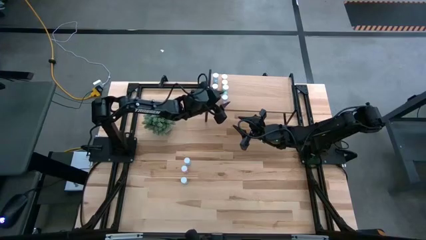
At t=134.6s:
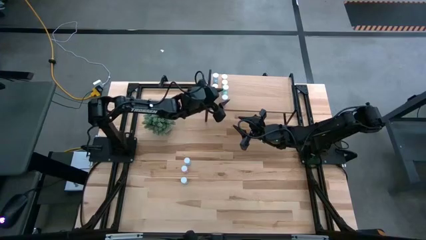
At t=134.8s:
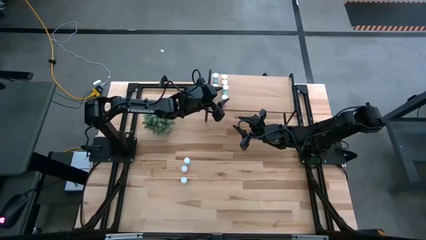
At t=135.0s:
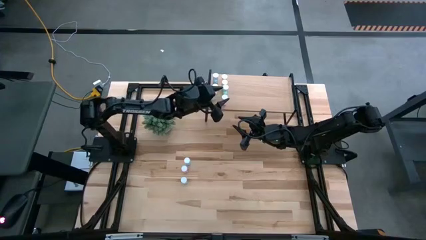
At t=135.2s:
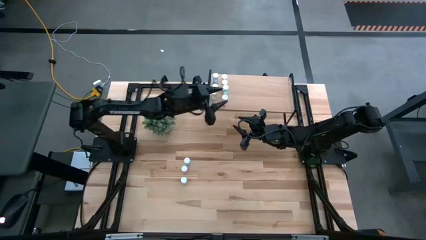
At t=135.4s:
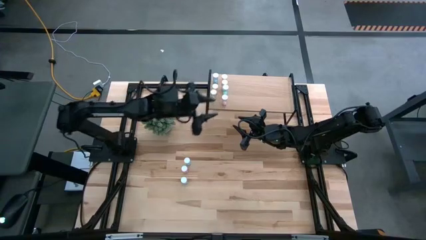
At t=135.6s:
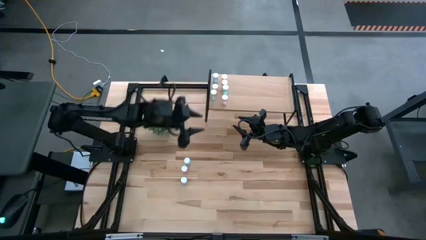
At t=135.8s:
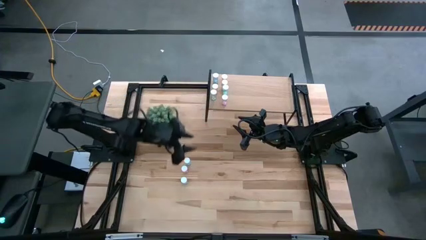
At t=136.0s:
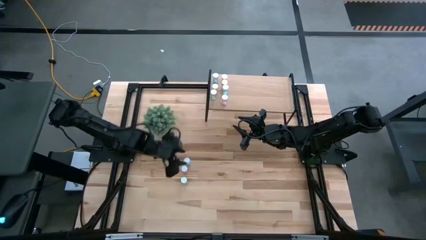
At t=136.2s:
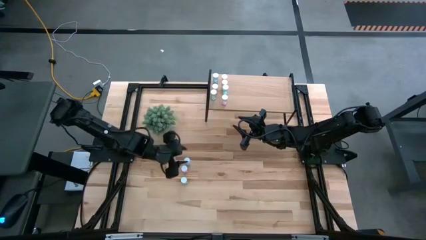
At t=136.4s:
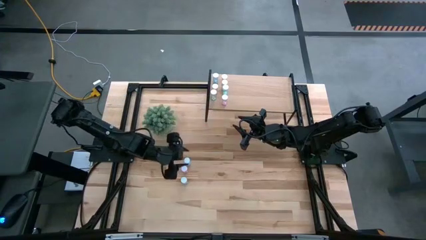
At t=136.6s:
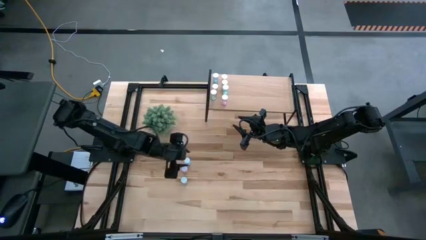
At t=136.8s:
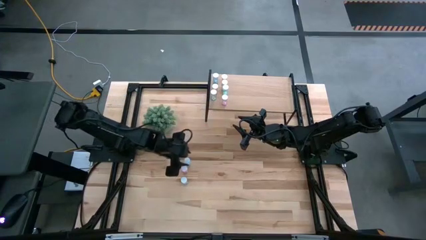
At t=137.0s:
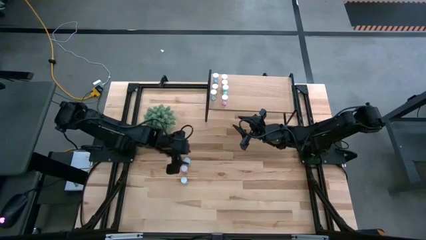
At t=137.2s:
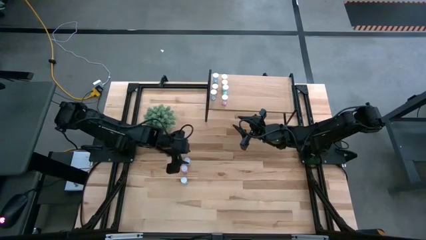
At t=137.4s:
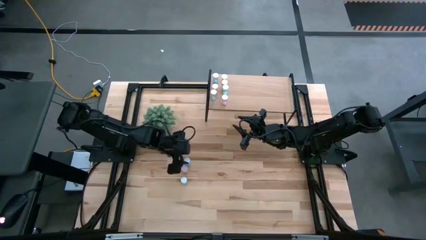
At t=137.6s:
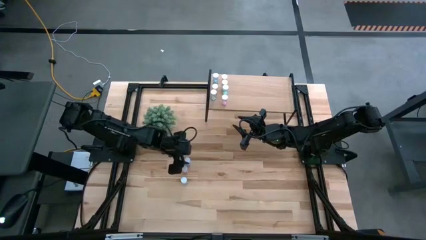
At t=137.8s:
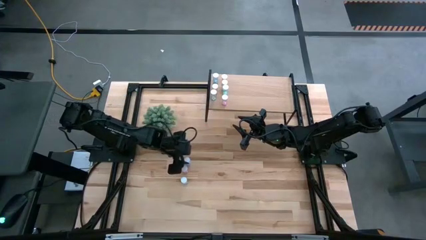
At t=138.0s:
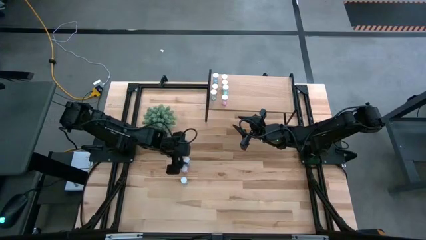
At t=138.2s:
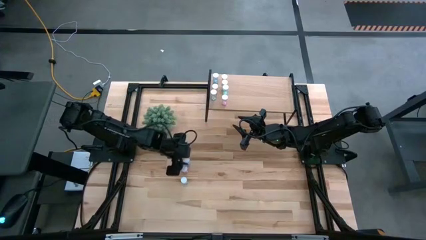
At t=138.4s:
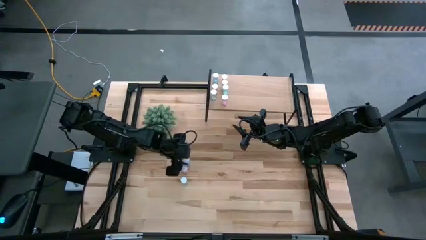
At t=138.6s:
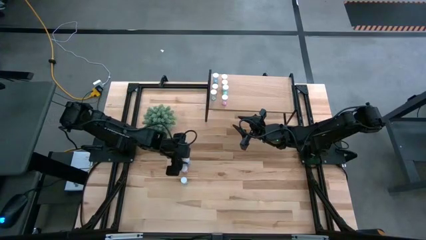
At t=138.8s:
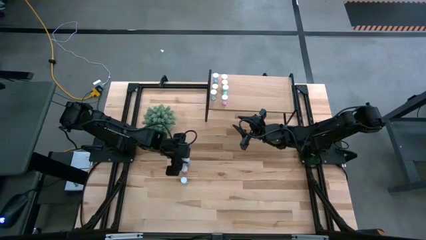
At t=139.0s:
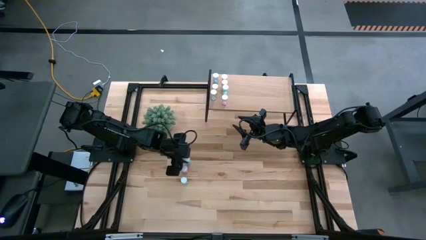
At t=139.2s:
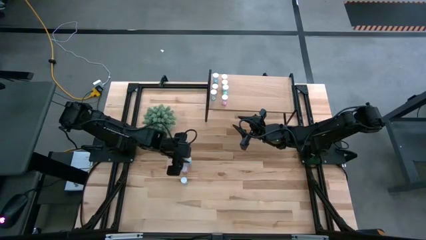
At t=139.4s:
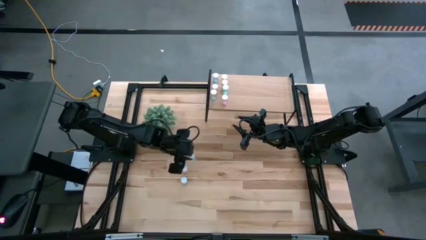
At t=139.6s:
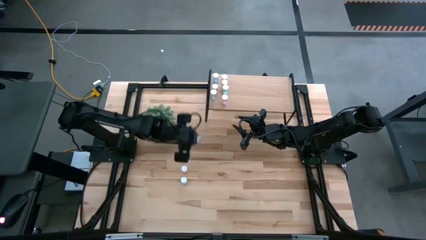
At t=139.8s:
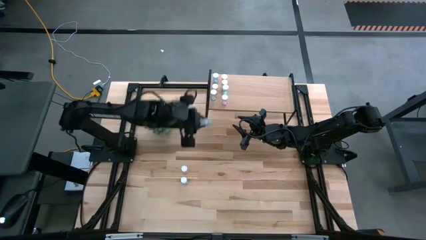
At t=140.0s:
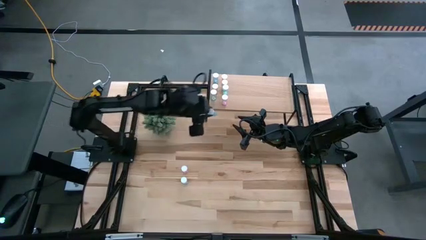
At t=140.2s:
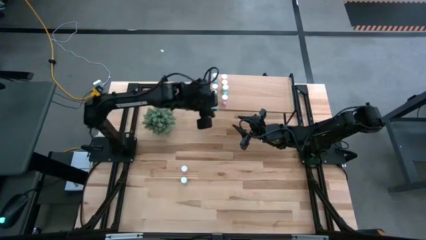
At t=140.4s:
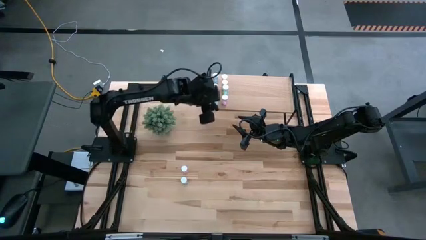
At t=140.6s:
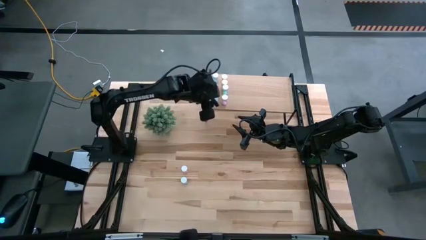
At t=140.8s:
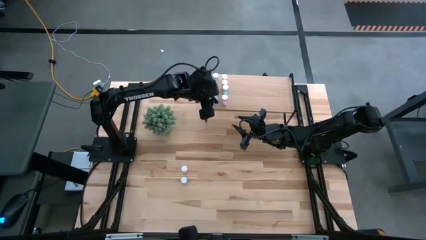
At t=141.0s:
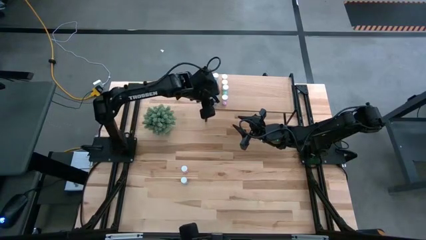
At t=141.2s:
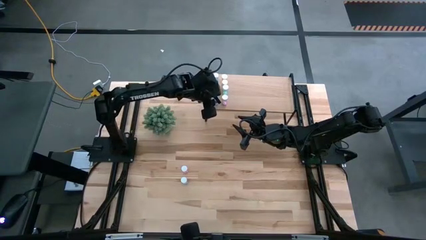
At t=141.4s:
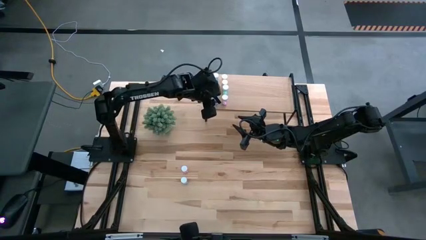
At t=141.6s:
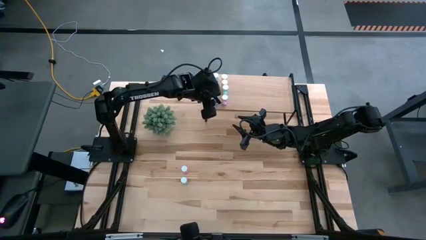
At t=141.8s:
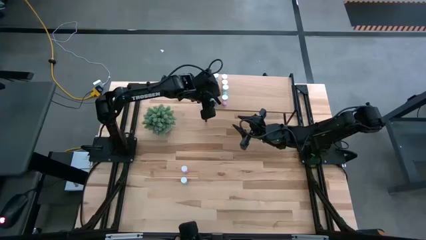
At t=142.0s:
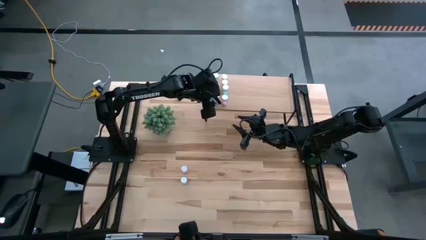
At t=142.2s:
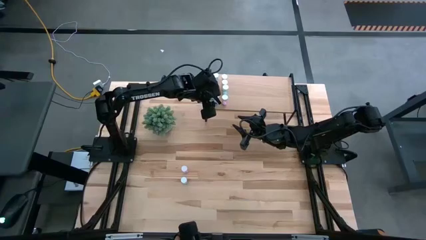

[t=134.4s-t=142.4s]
Task: Pick and place medicine bottles onto shelf by color
Put the transparent blue medicine bottle on the shelf

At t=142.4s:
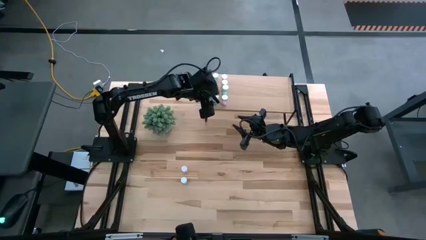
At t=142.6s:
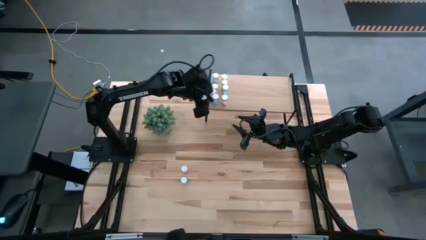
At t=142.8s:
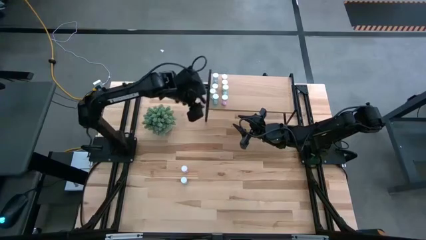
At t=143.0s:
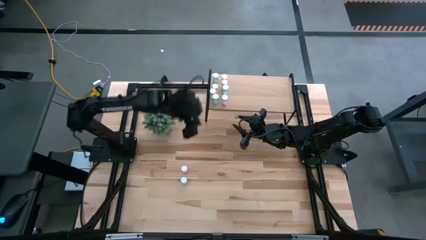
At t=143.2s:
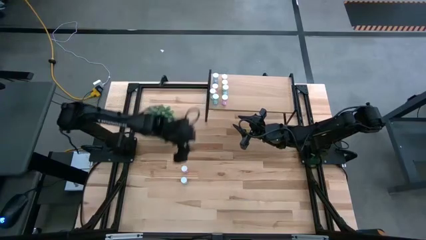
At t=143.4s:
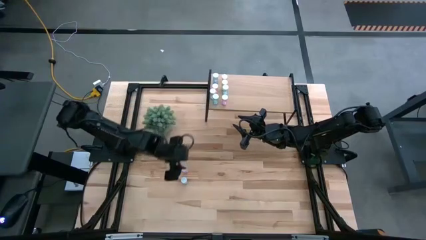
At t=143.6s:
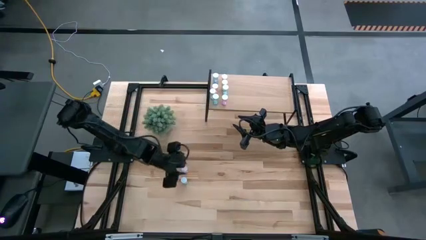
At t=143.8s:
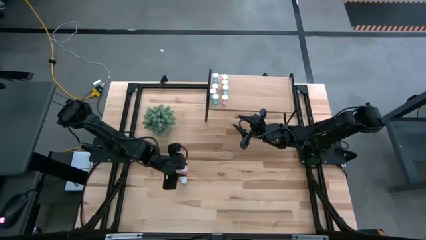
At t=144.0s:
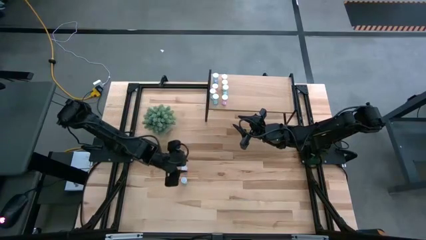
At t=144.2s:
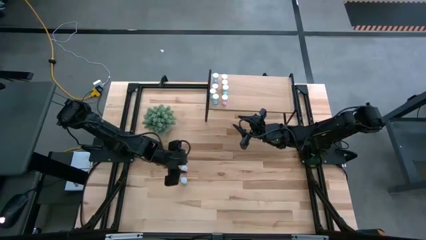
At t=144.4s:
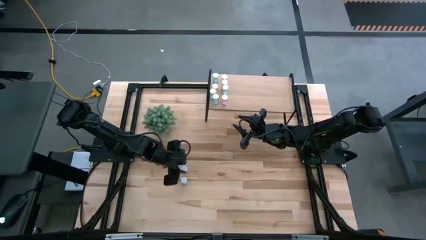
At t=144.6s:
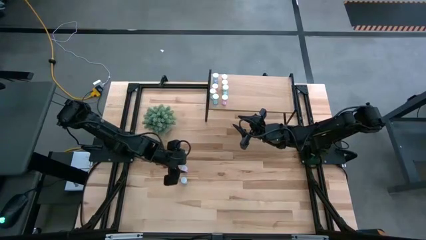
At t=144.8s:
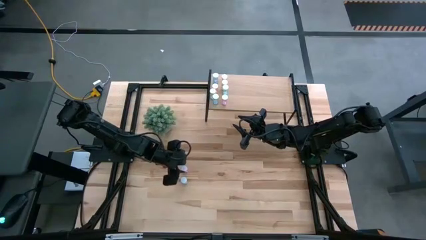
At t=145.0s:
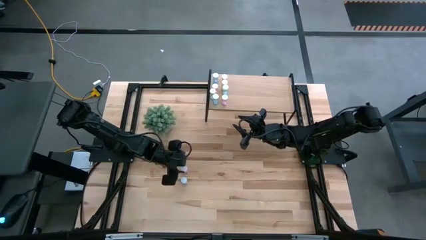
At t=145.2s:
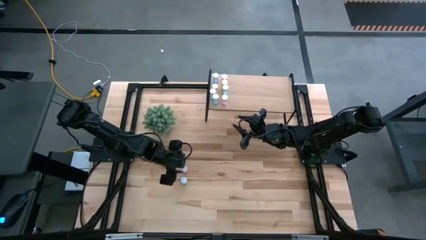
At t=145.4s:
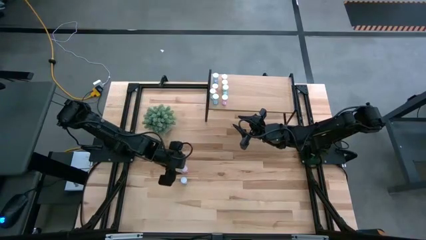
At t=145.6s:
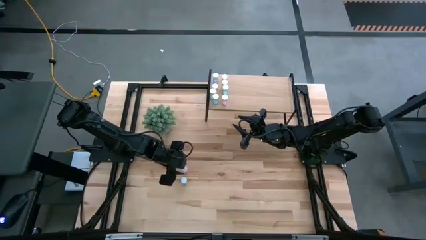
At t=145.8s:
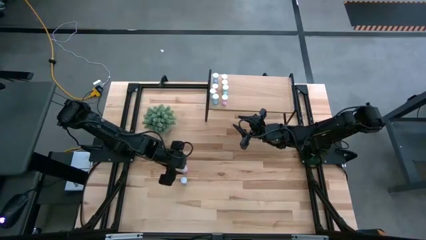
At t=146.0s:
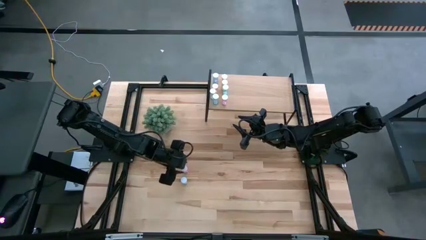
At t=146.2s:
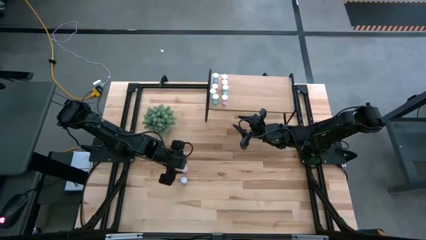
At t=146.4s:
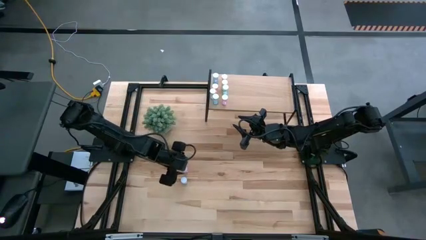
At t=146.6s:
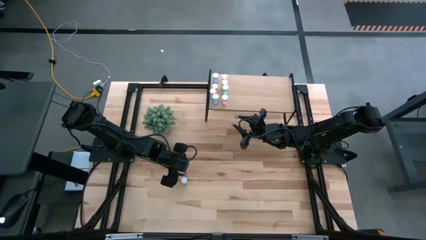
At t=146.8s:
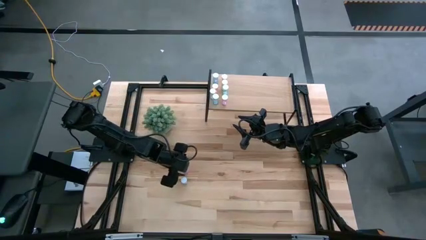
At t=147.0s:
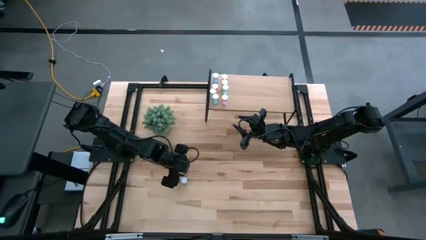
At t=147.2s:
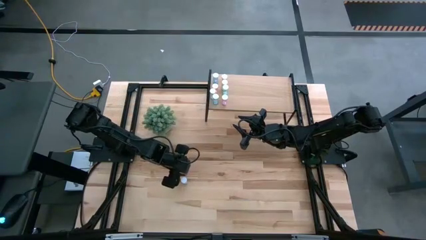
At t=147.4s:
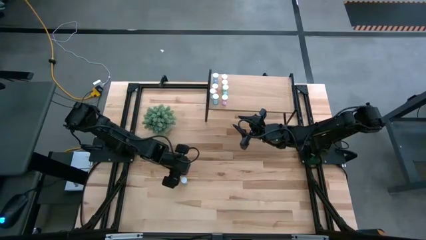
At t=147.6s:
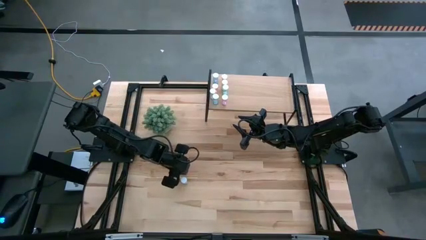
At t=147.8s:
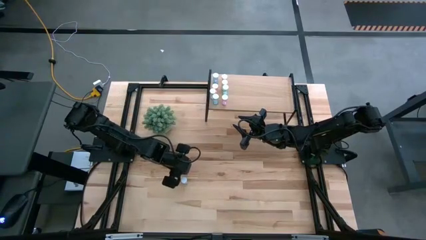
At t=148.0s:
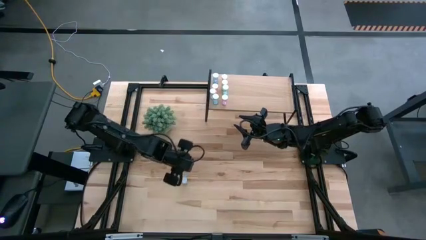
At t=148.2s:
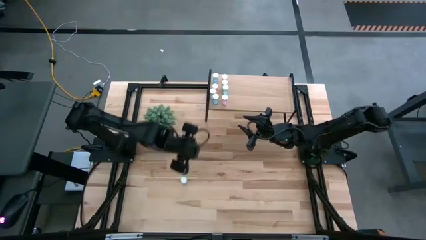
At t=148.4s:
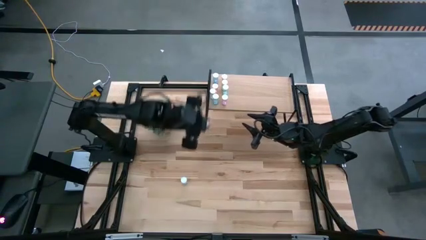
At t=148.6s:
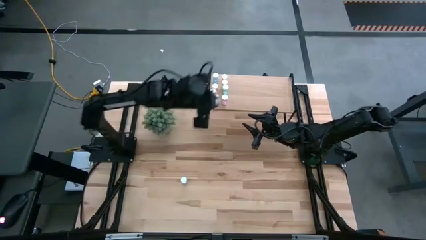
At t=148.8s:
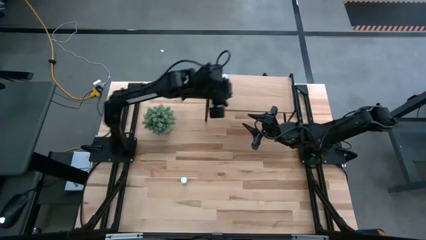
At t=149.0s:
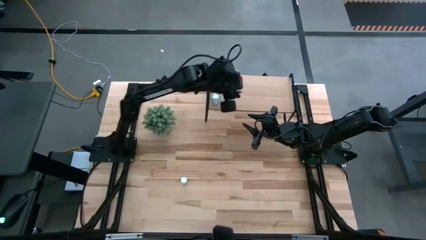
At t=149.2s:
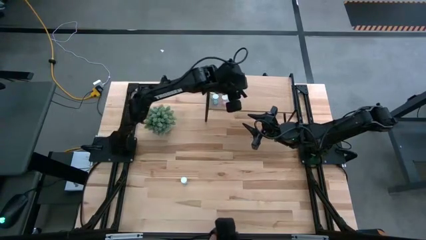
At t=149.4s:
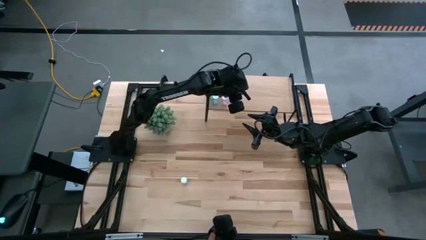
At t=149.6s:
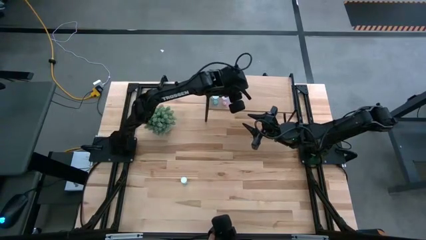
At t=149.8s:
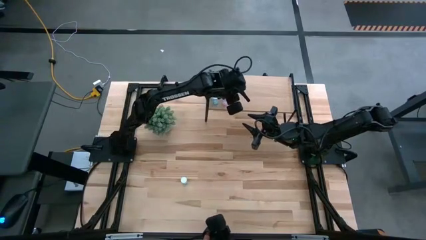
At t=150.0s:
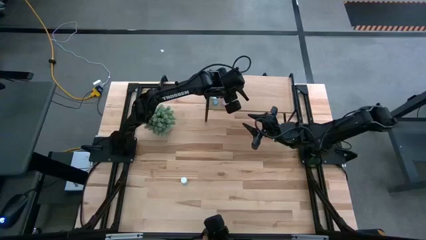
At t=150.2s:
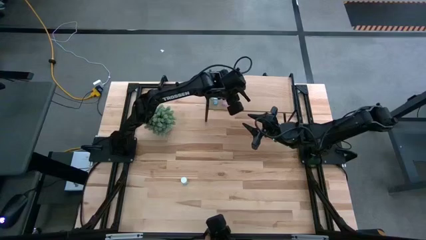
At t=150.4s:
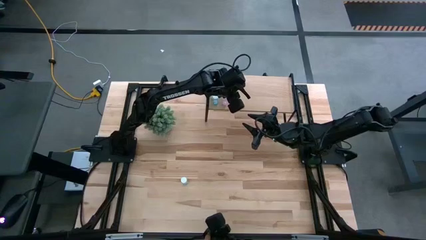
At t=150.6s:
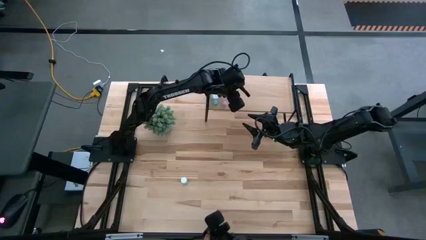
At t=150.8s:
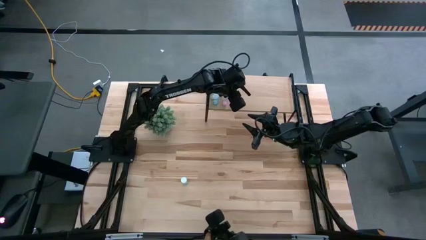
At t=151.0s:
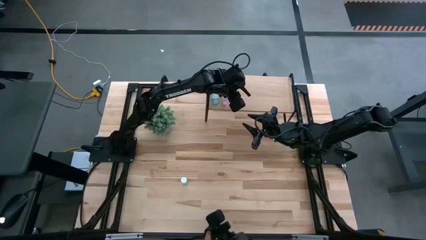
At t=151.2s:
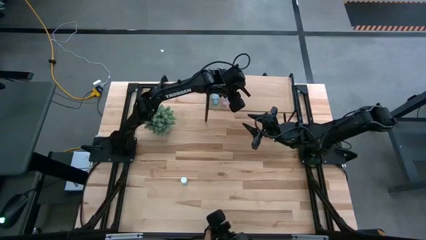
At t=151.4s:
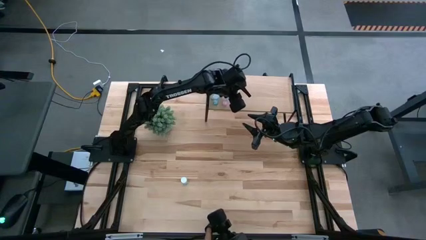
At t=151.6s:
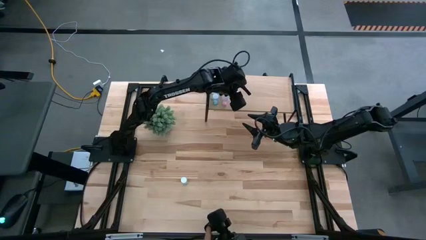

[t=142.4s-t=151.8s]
Put the transparent pink medicine bottle on the shelf
